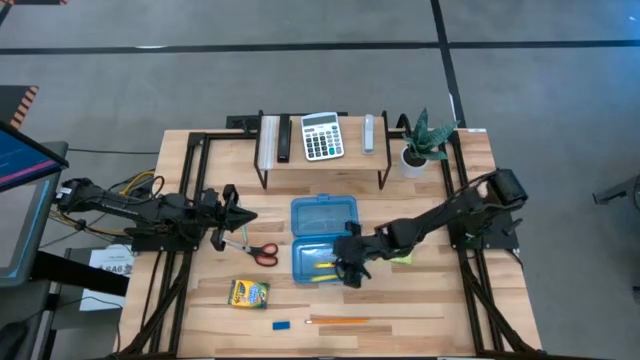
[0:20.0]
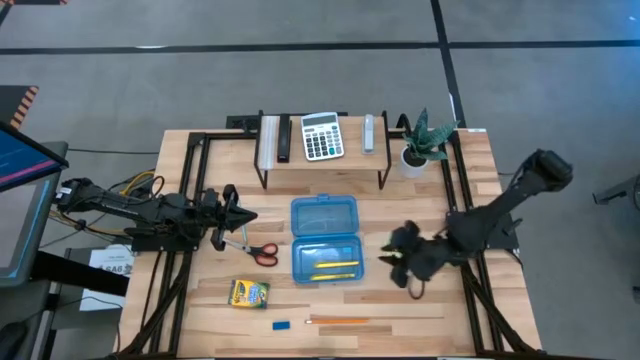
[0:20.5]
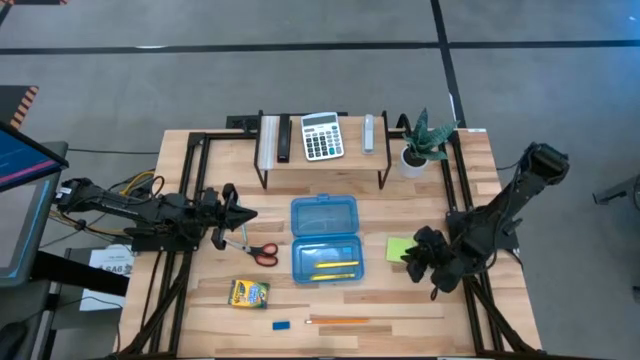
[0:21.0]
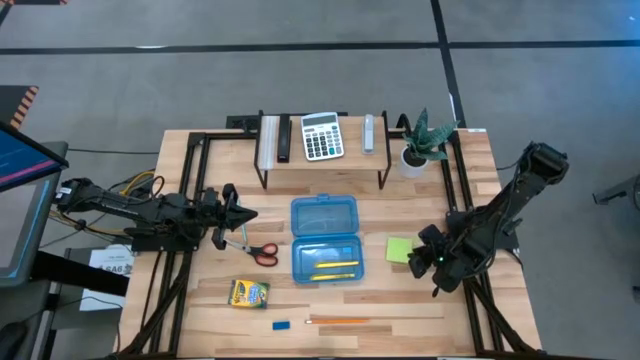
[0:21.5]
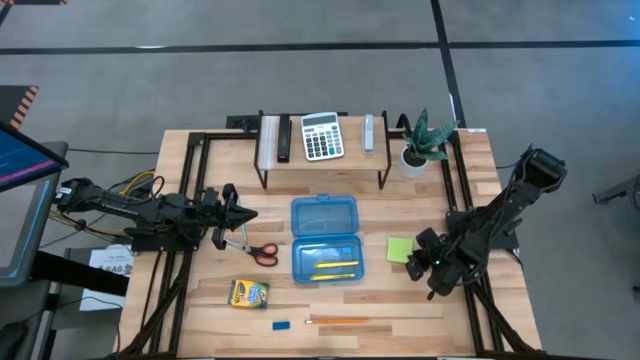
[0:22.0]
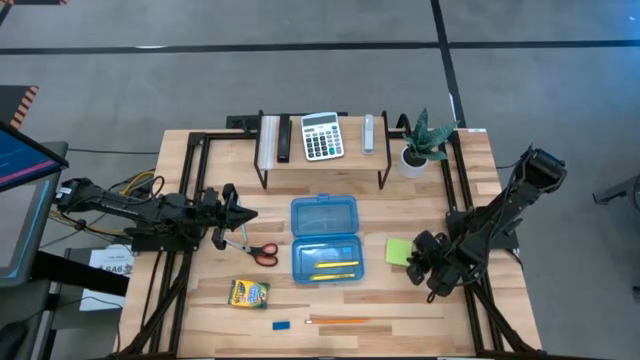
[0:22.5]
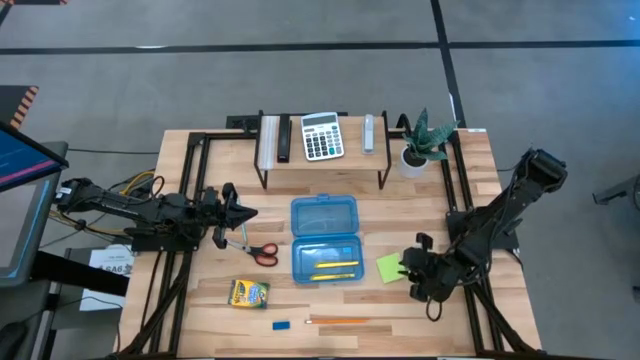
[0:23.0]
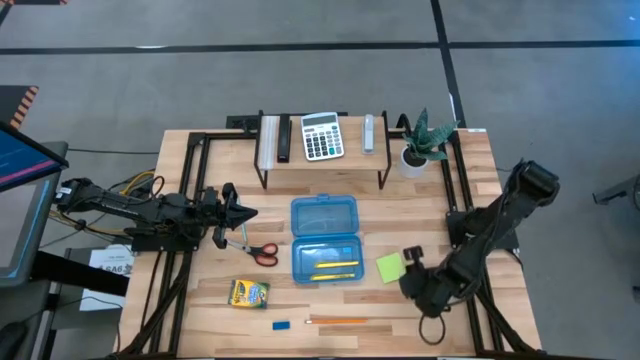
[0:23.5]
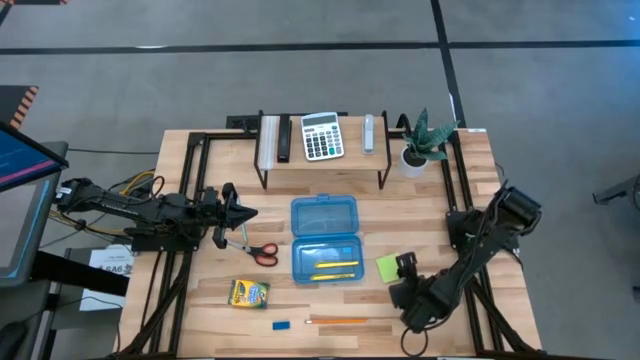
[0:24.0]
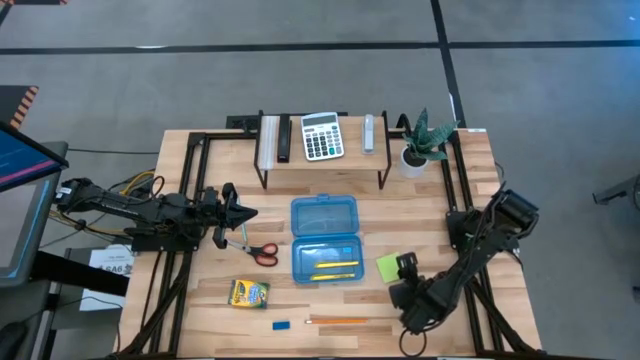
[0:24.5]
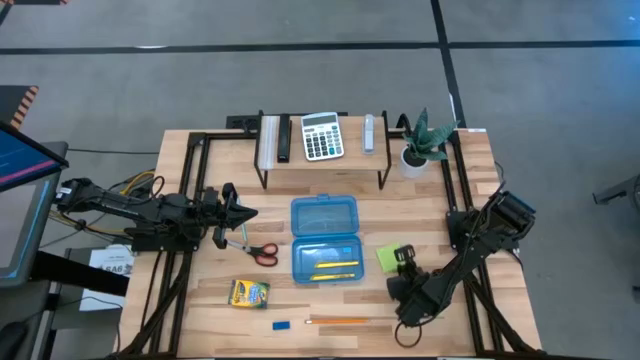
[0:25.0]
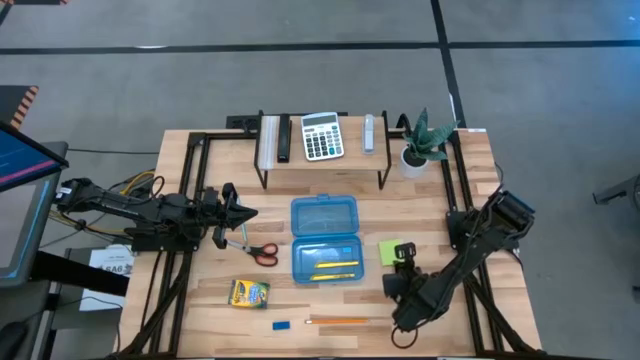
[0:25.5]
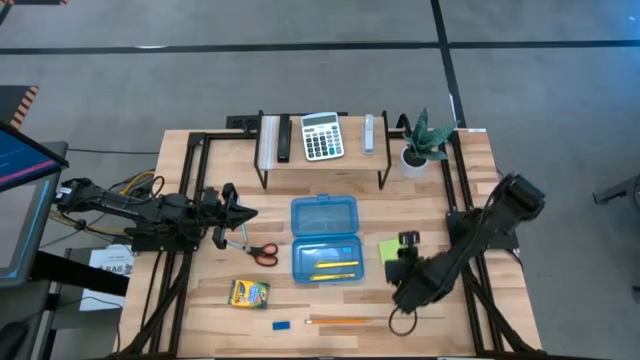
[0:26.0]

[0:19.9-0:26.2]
Task: Pack school essentials
Put the green sticky notes into the blue supply box

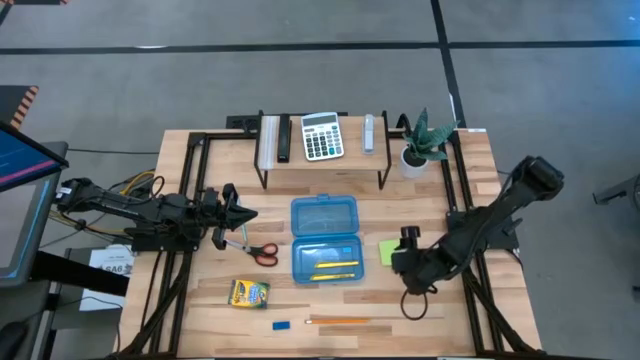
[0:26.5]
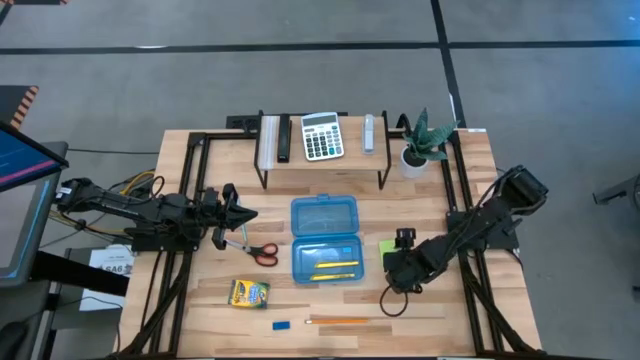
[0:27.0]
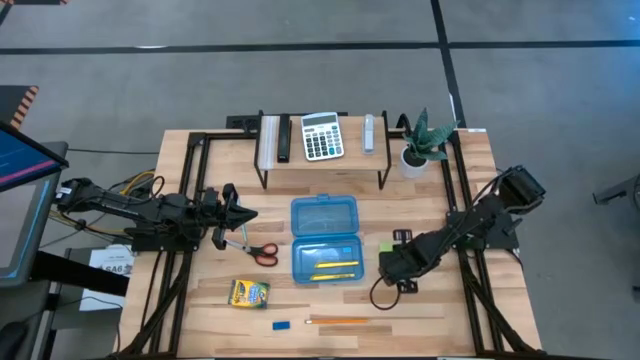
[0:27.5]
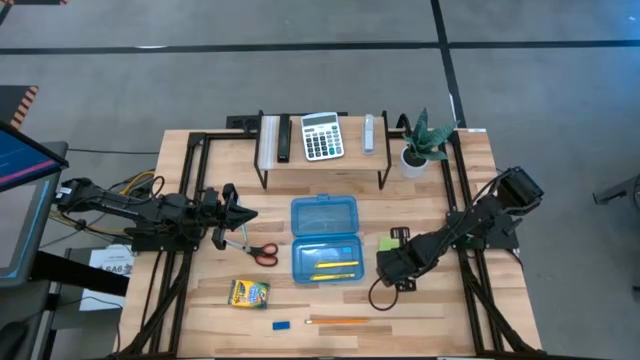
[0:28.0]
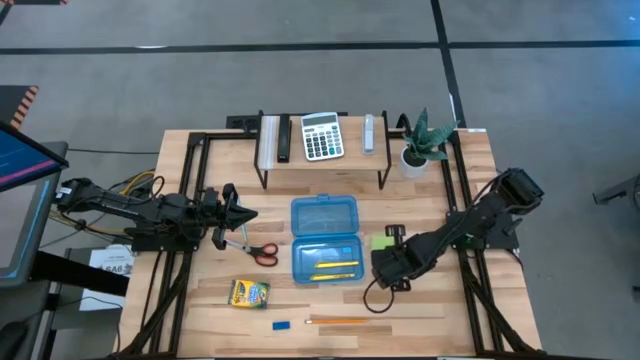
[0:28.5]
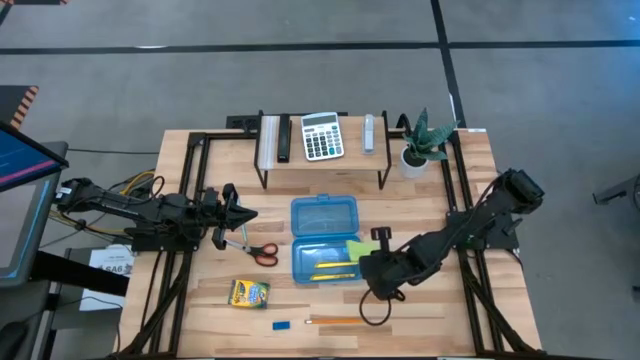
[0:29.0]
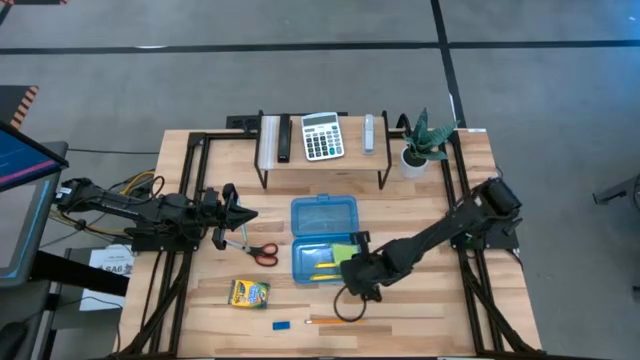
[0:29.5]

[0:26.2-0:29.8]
Put the green sticky notes into the blue supply box

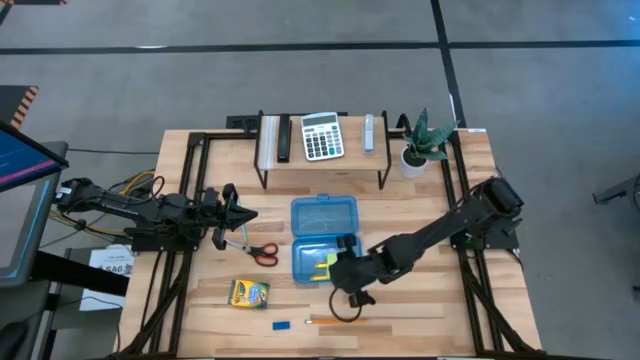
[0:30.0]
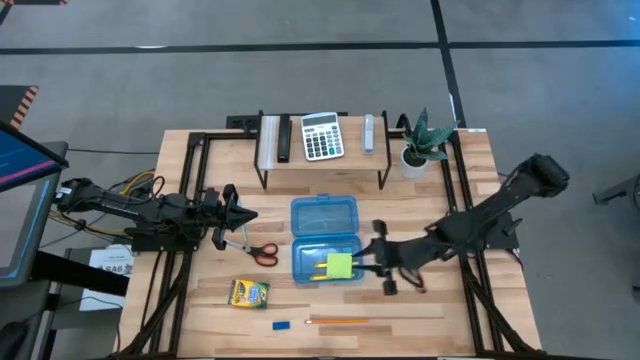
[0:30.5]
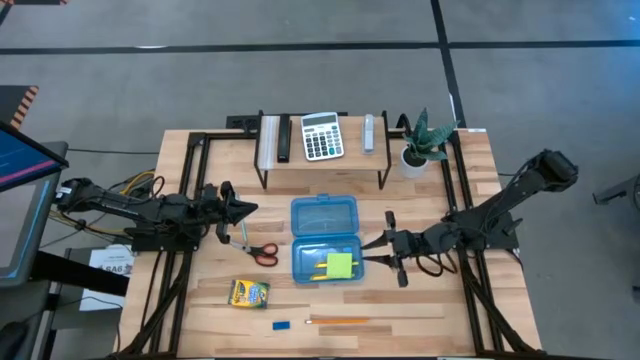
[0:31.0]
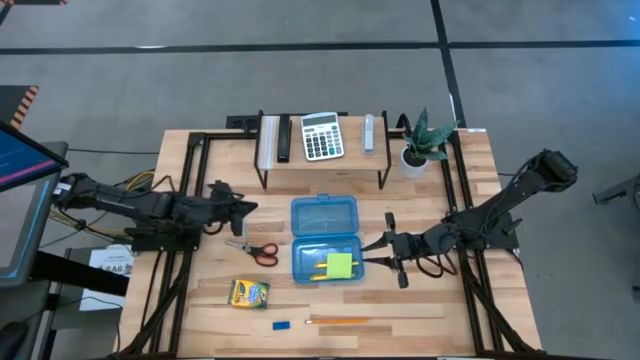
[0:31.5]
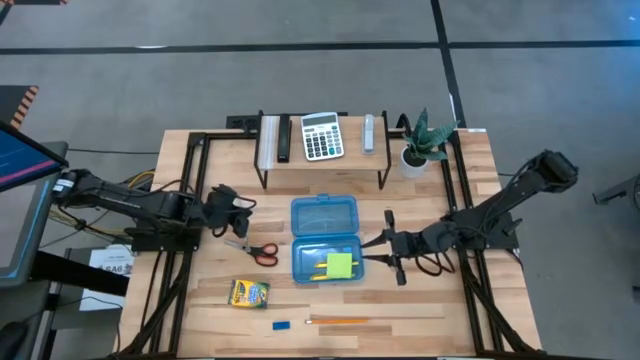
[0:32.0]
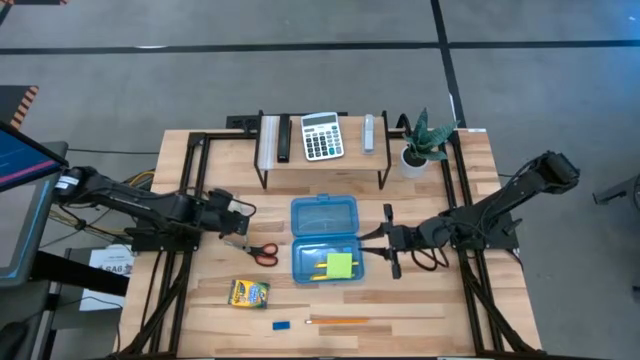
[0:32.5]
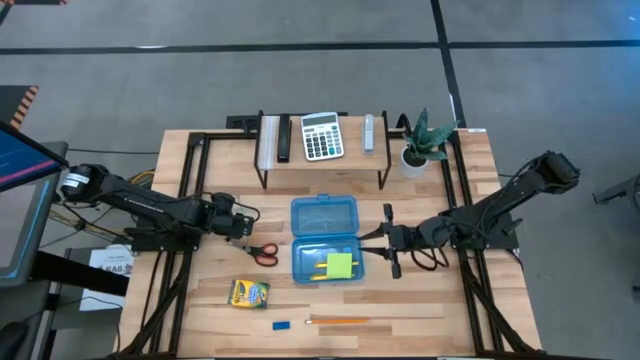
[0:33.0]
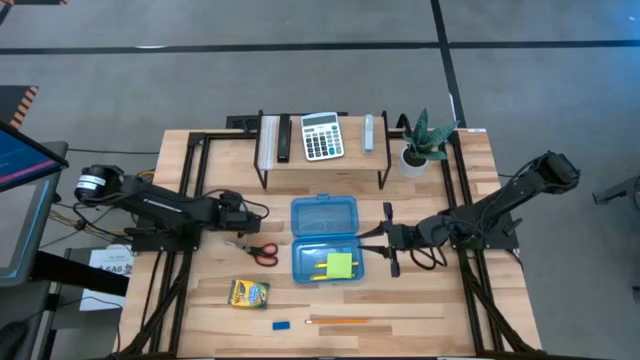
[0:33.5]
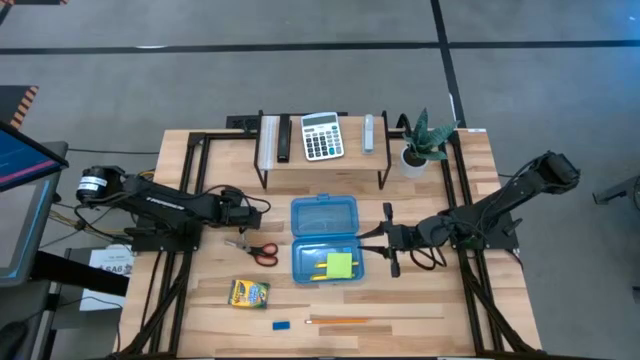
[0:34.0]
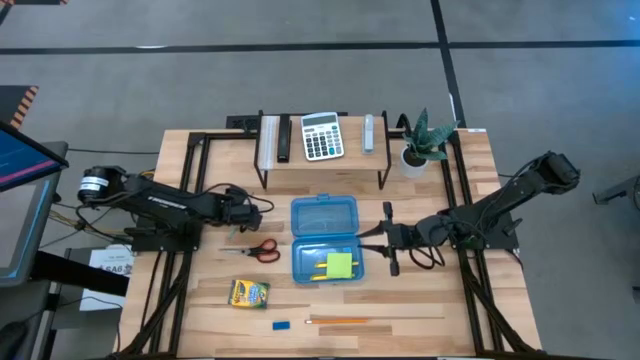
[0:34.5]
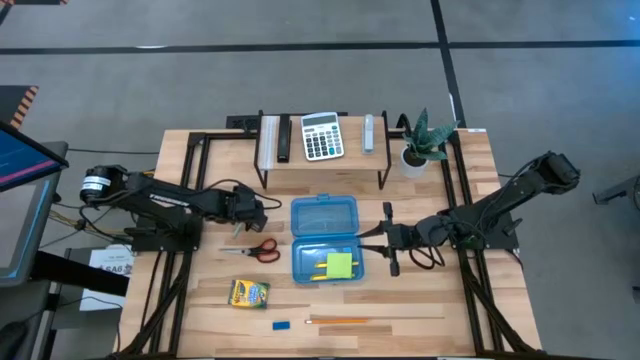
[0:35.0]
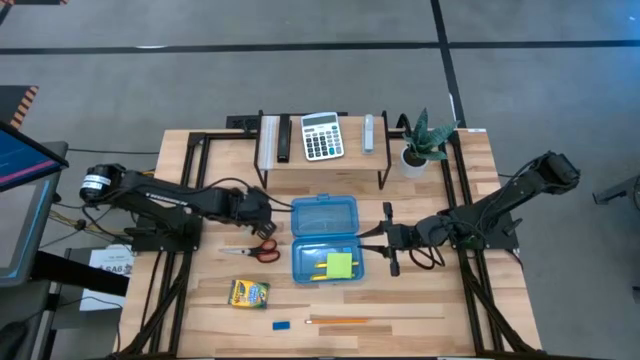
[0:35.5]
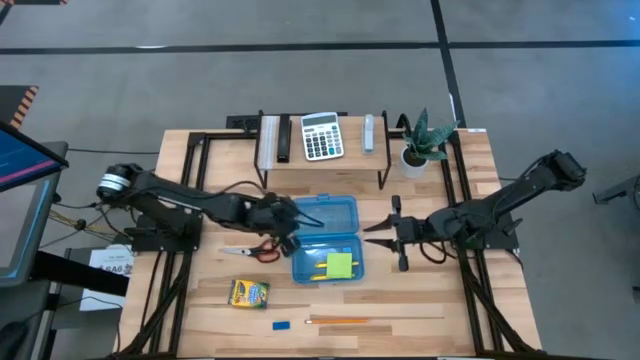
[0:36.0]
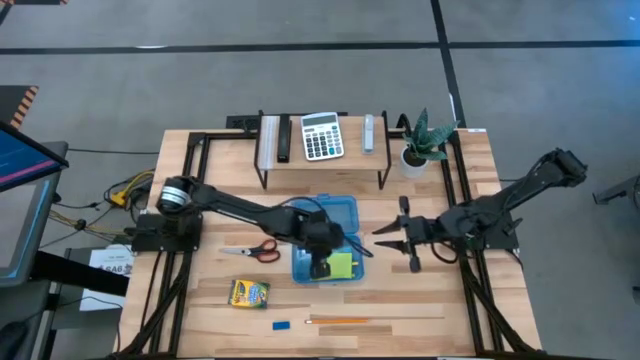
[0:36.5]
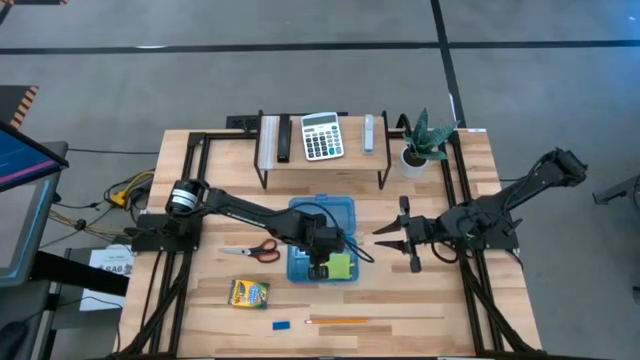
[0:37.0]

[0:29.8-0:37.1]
Put the blue pencil into the blue supply box

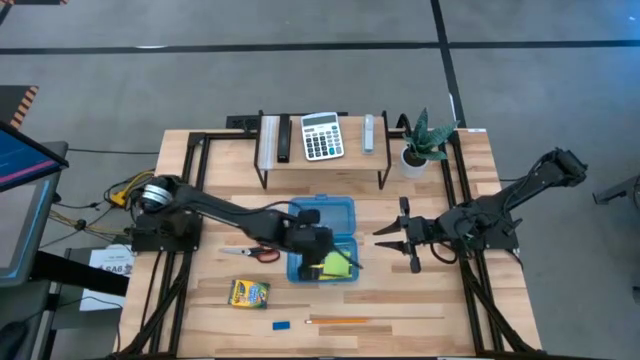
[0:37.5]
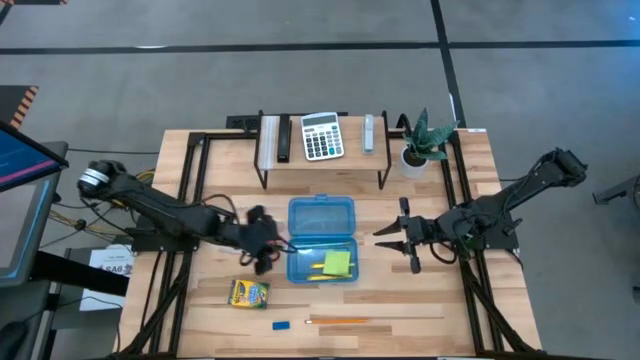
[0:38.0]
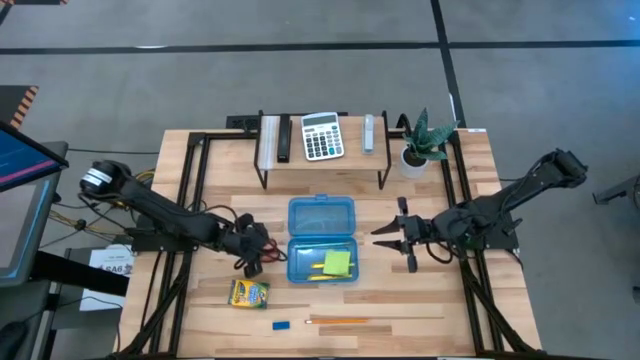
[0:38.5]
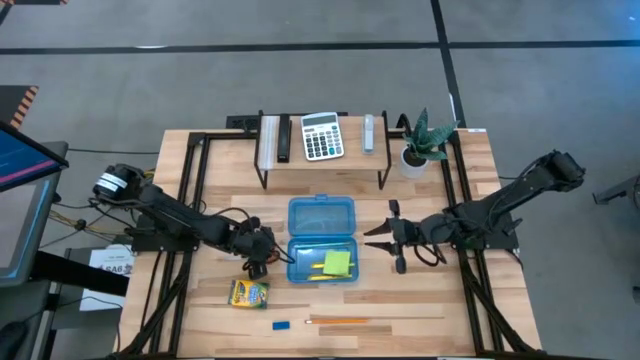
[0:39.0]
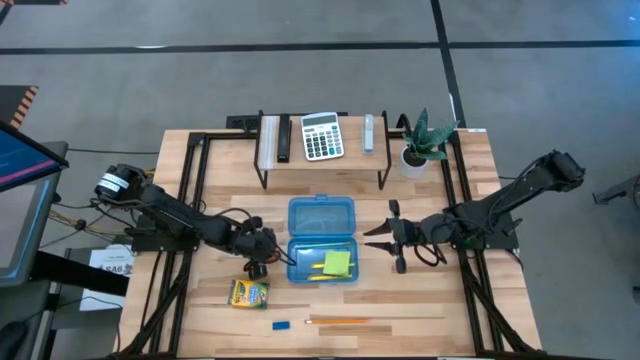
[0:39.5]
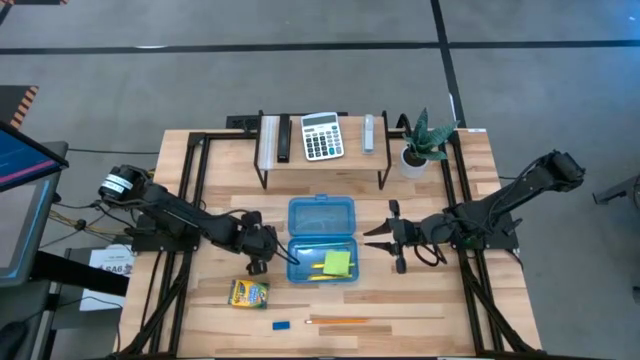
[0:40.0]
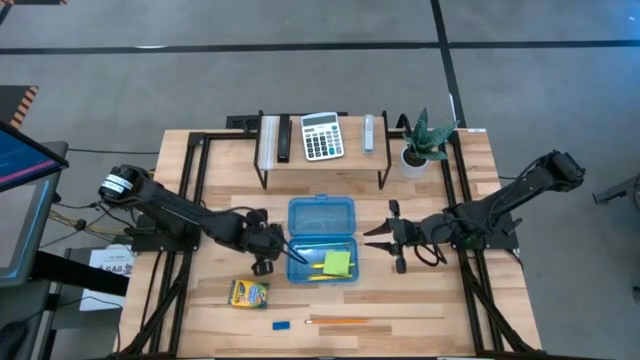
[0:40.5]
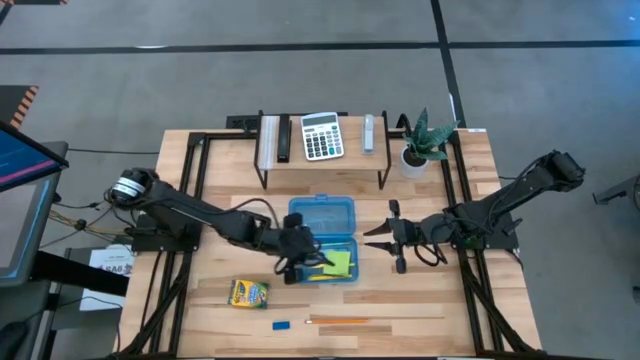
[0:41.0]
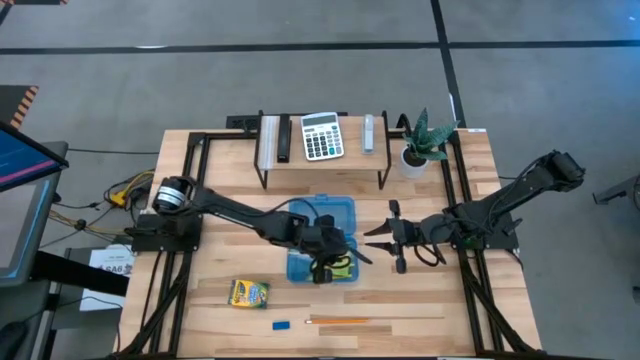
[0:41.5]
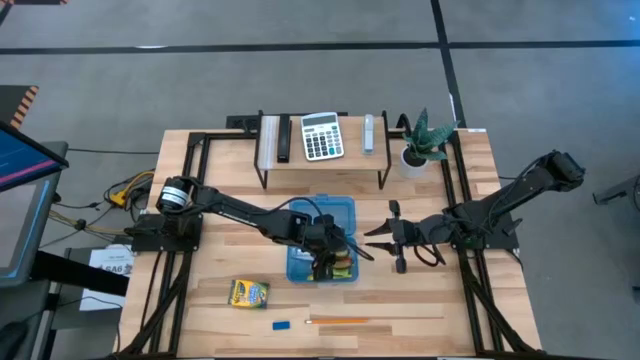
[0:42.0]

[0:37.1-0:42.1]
Put the black scissor into the blue supply box
